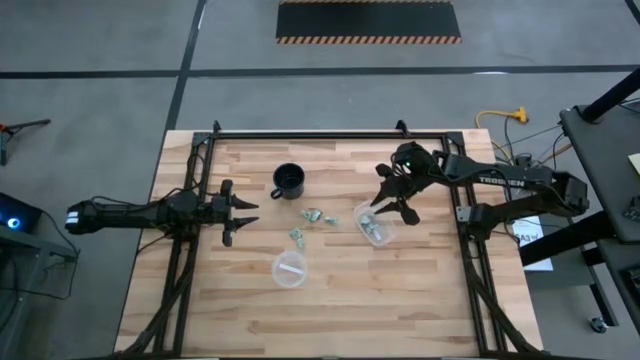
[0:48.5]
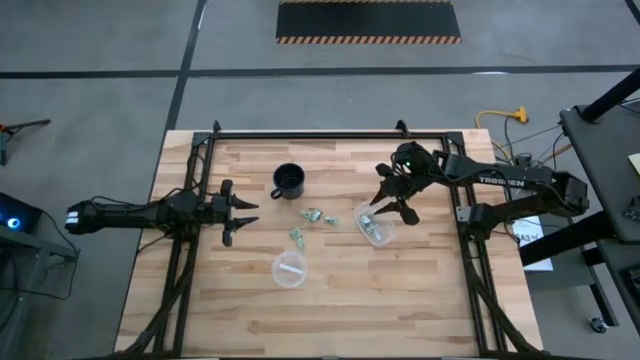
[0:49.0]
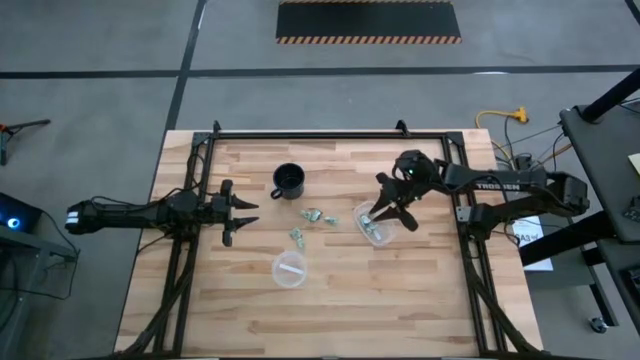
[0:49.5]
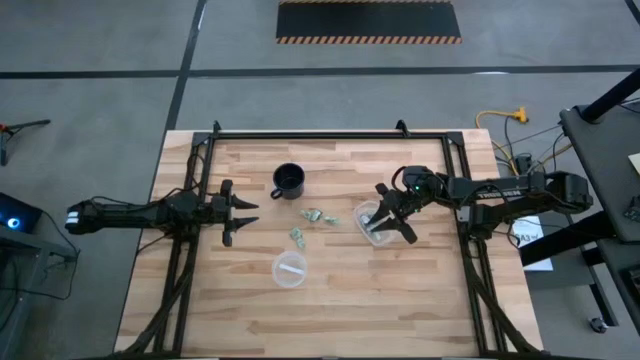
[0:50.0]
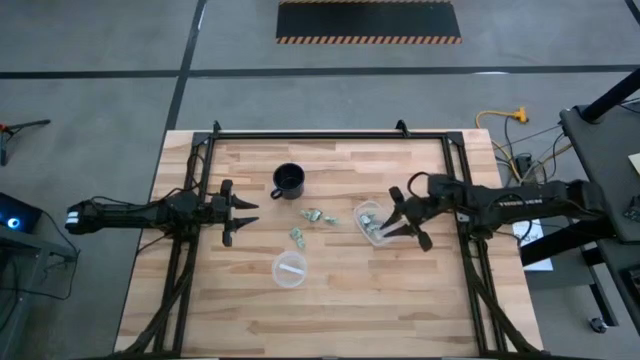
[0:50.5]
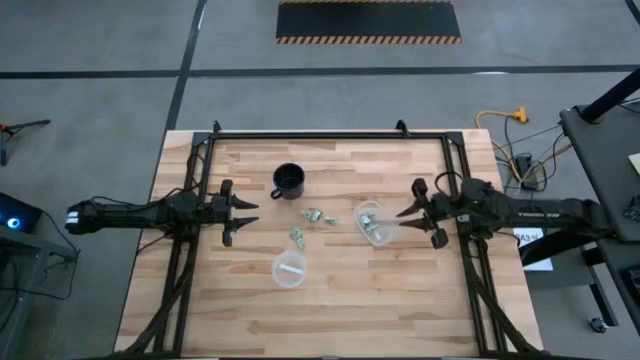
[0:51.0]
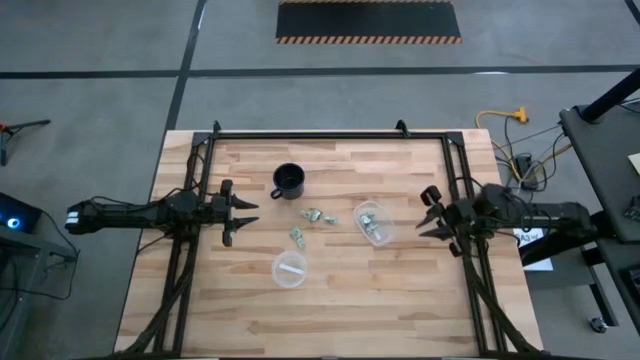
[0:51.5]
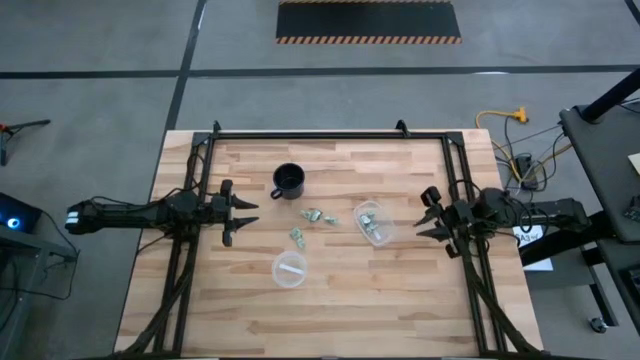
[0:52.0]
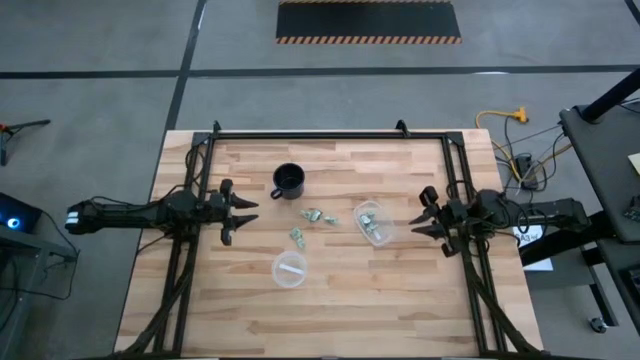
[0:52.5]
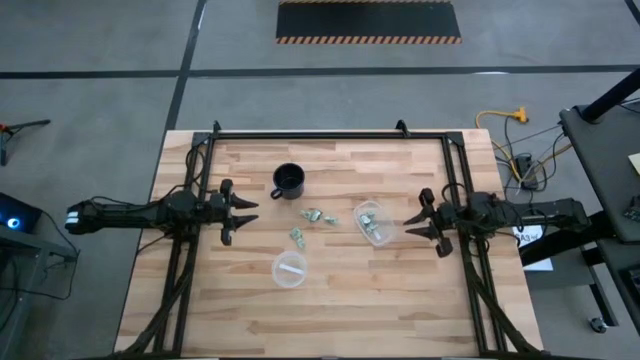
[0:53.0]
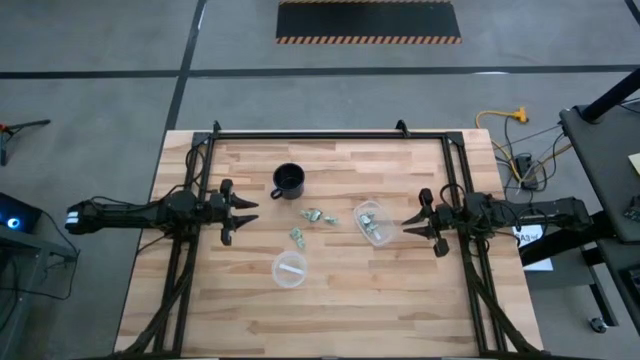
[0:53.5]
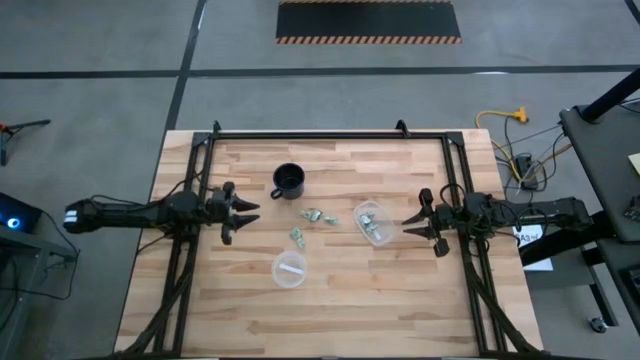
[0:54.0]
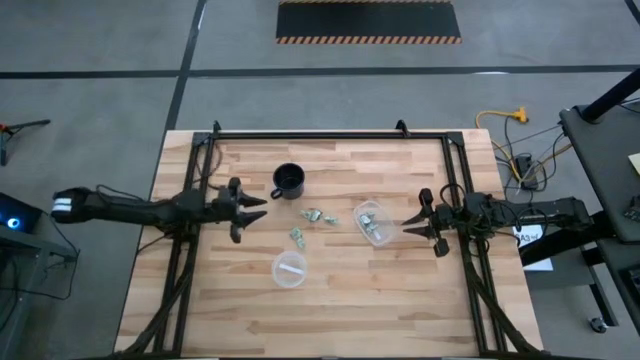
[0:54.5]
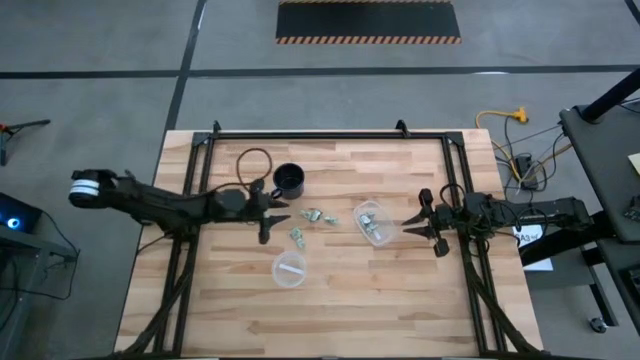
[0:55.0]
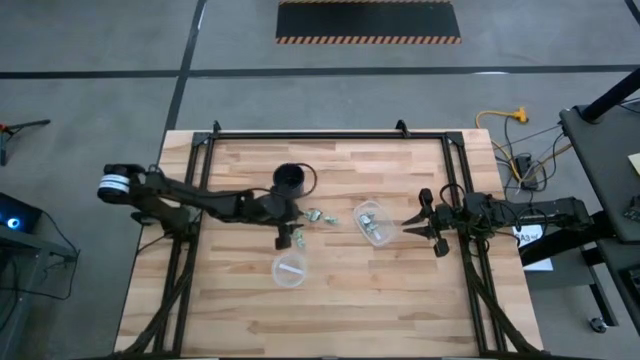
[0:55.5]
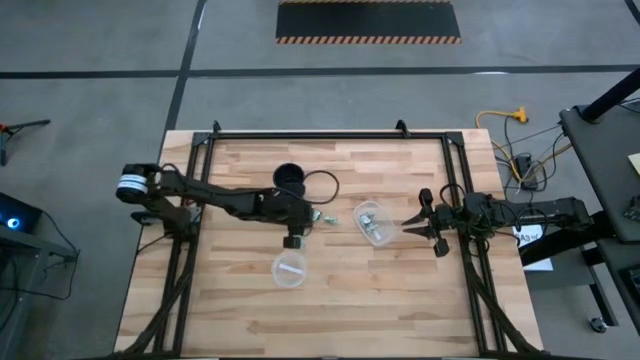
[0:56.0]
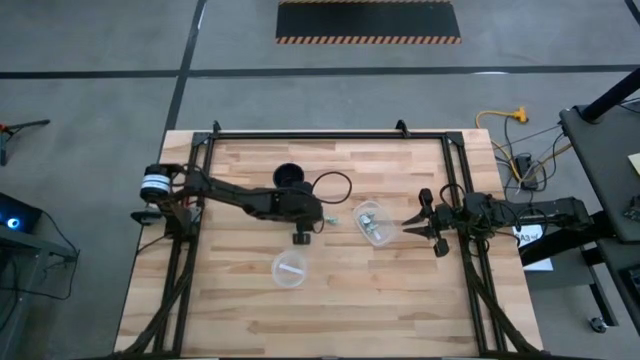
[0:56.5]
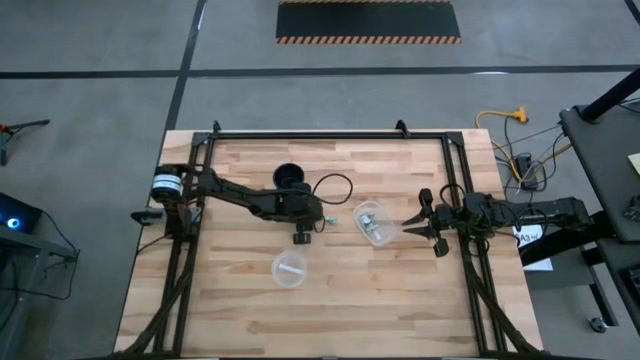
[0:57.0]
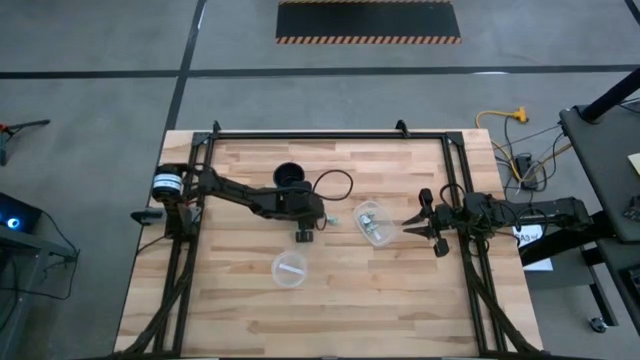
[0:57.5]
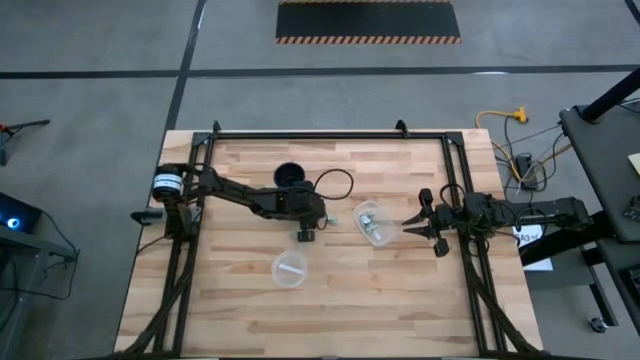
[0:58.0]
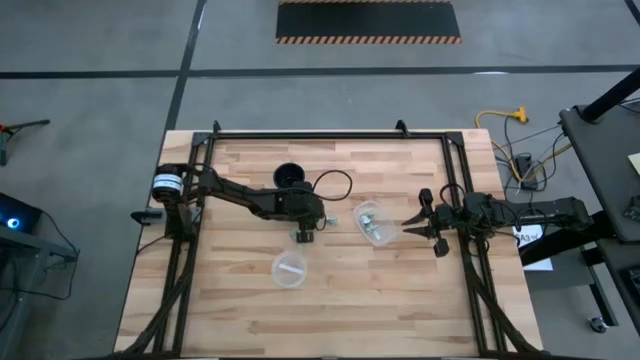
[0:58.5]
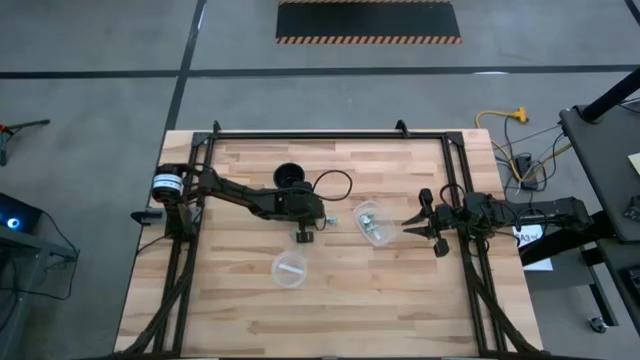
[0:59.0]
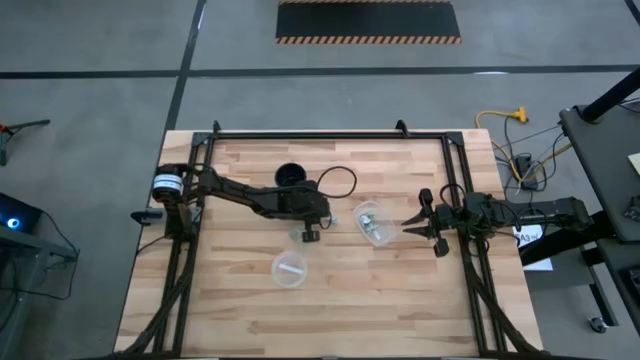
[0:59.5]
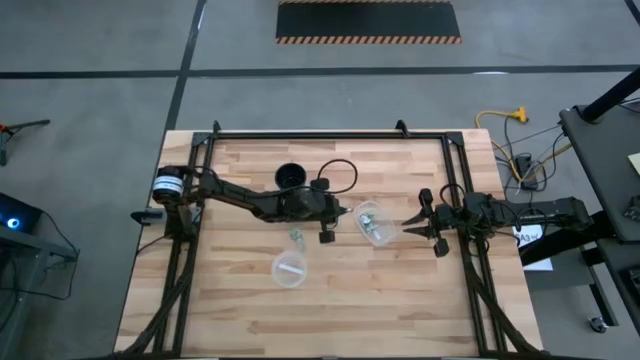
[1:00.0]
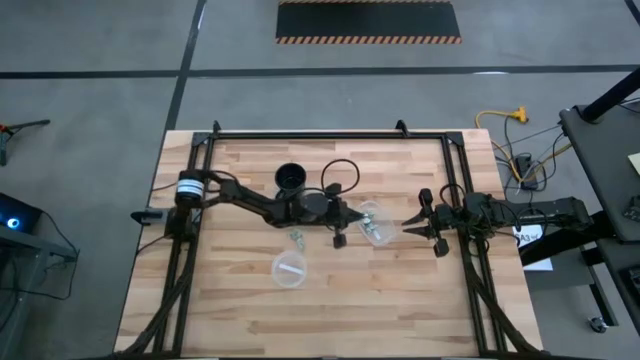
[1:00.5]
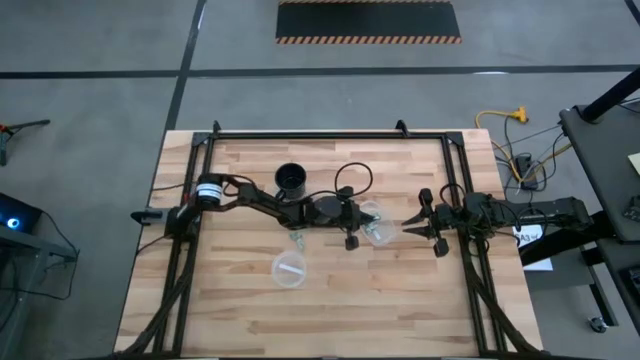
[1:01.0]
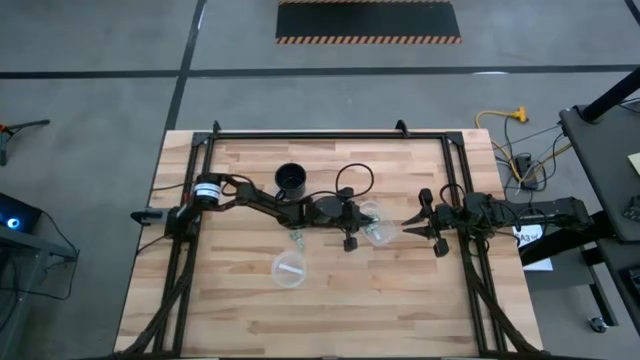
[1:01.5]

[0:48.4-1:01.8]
Task: Pick and place Stevia / Truvia into bins
Put the green stevia packet into the top transparent container

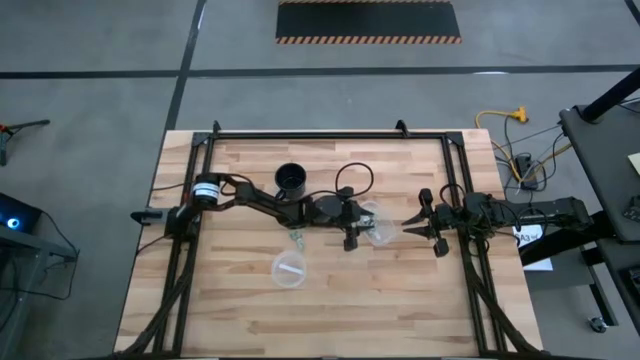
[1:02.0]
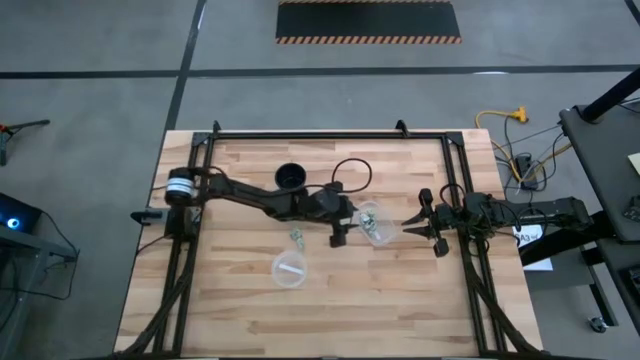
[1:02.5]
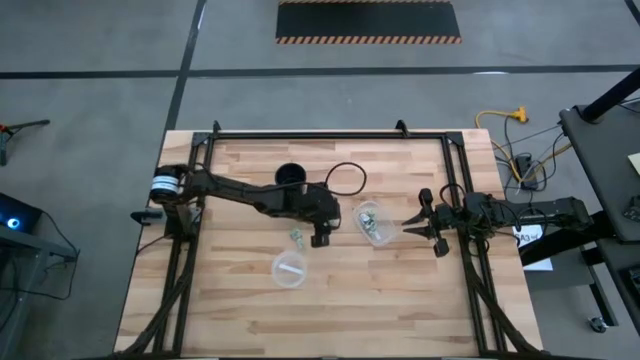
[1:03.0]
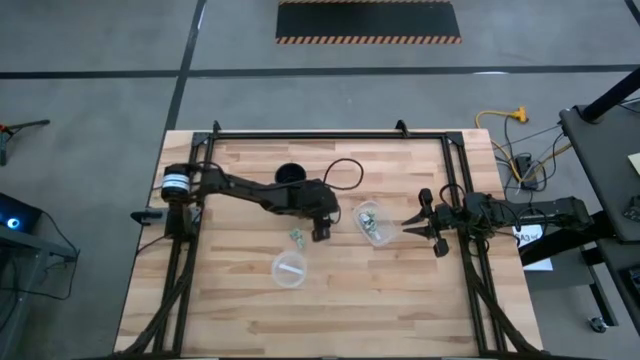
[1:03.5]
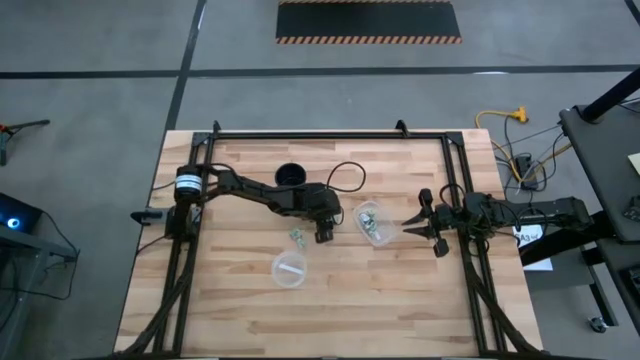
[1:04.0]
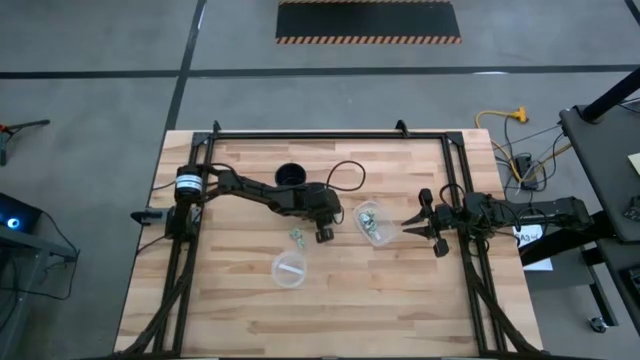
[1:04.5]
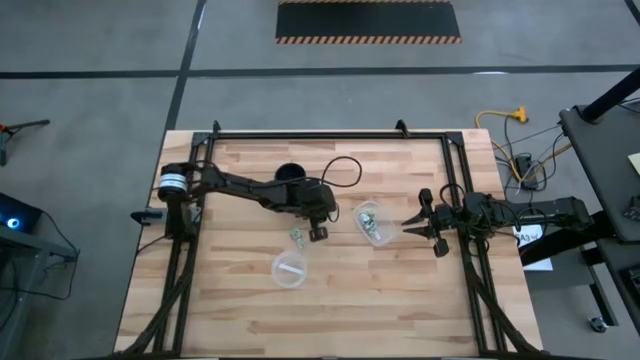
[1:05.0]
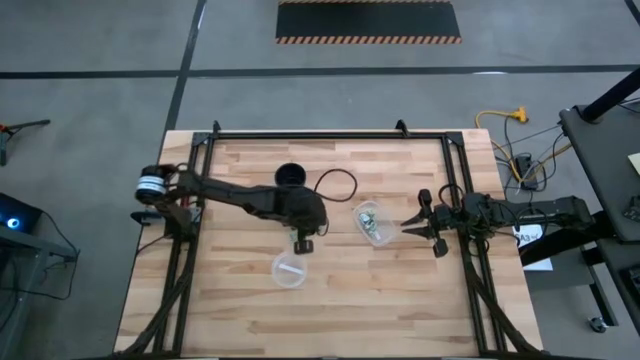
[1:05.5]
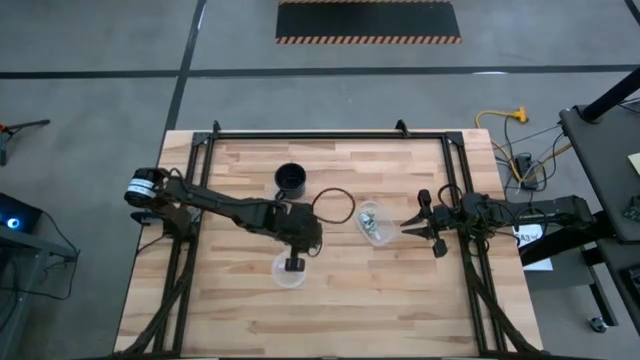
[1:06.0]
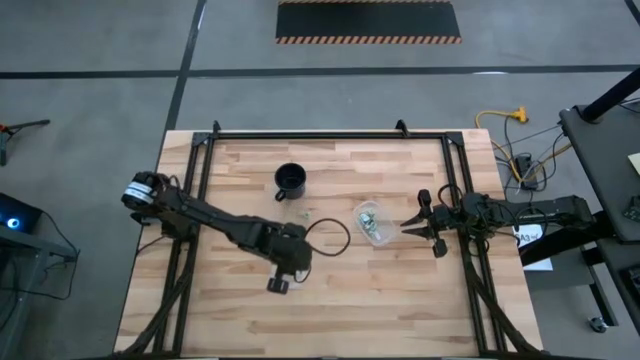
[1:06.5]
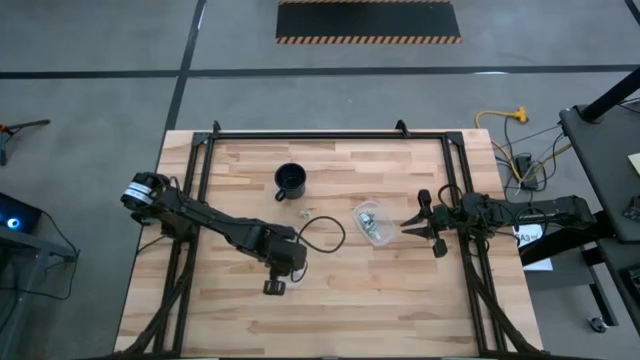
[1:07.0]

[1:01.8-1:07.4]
Put the white stevia packet into the bottom transparent container

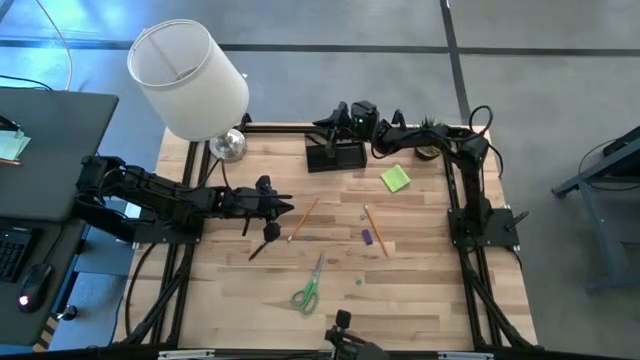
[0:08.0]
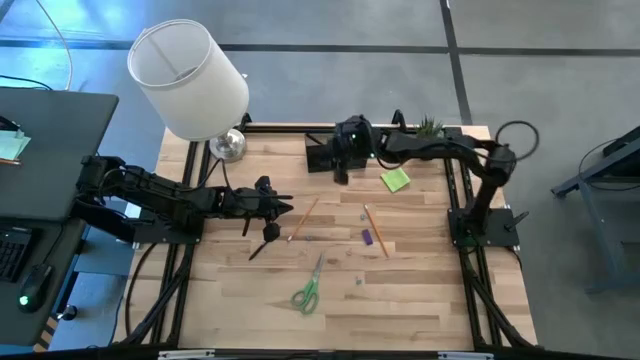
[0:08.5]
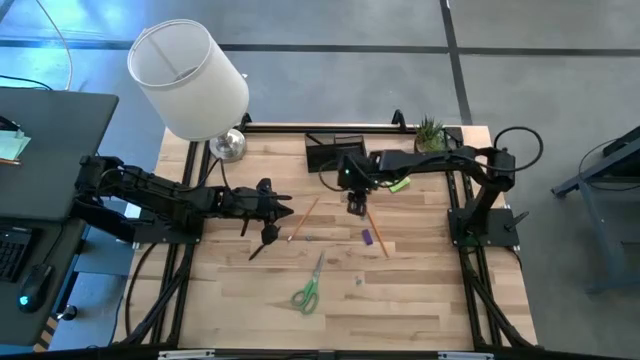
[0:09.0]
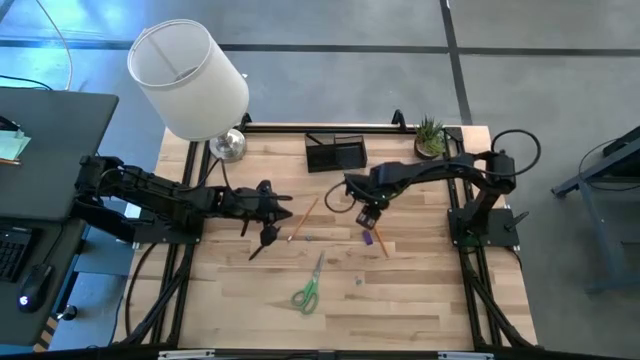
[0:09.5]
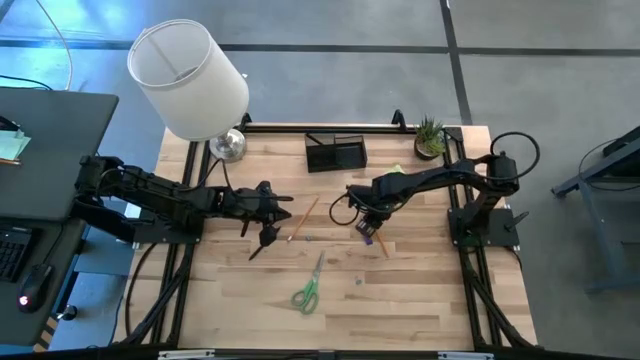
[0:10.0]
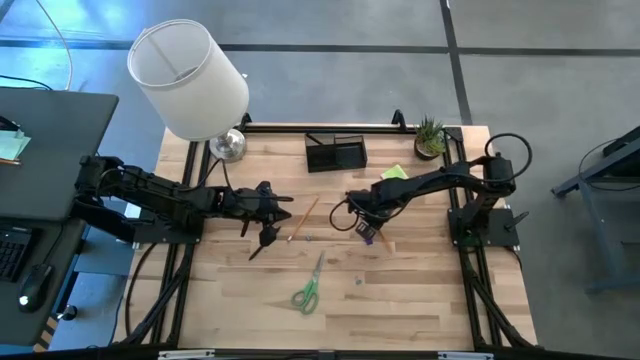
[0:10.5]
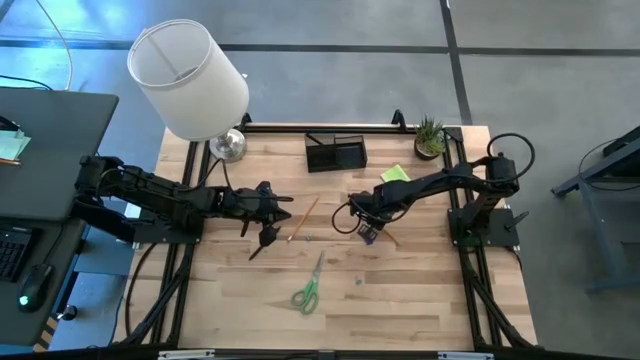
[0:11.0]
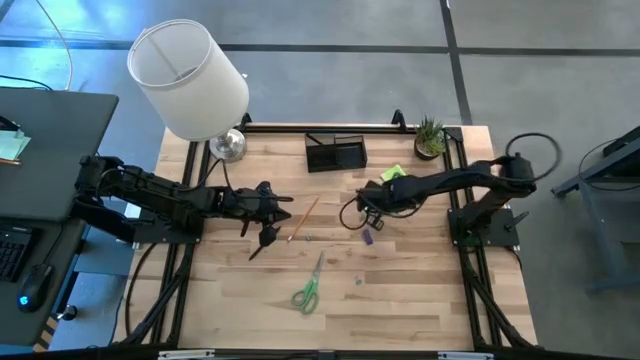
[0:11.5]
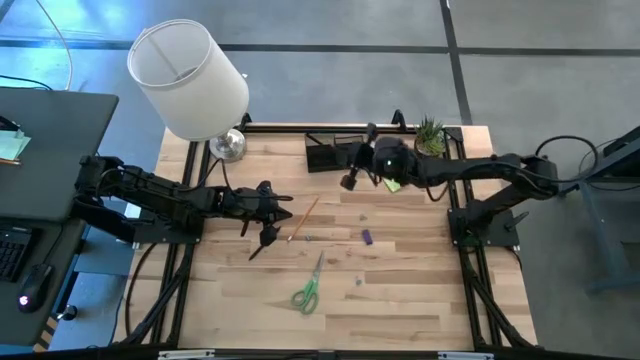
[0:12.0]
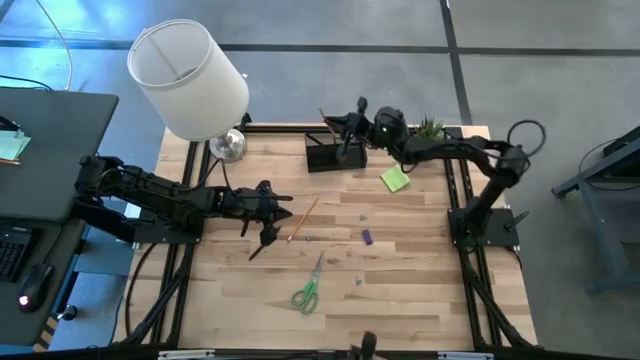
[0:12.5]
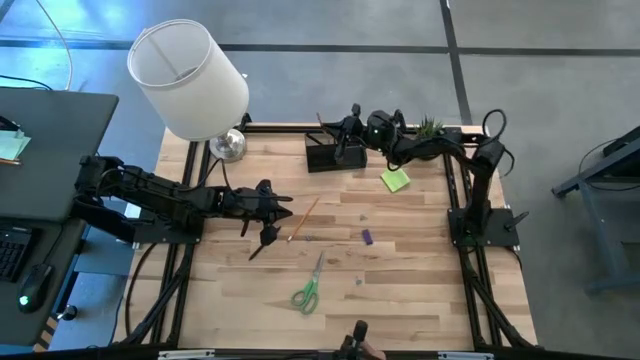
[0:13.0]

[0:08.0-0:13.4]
Task: Pick and place office supplies into organizer
Put the right orange pencil into the black desk organizer
